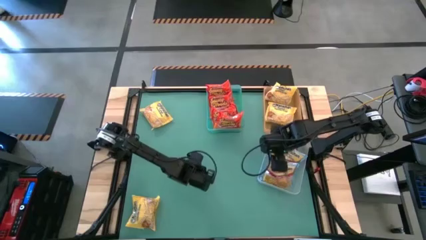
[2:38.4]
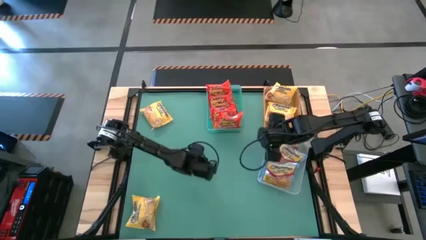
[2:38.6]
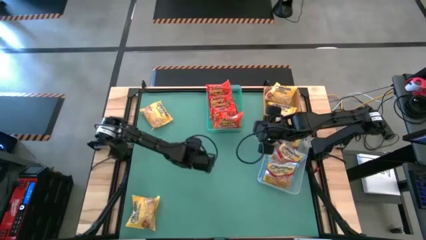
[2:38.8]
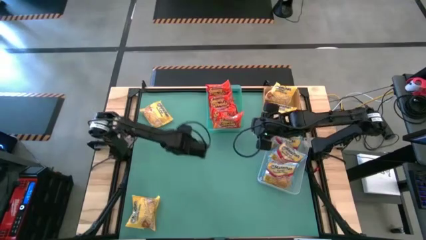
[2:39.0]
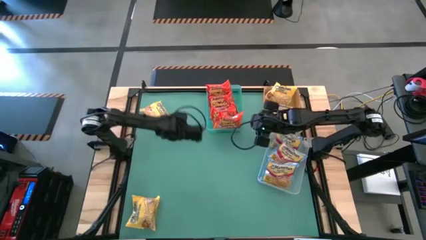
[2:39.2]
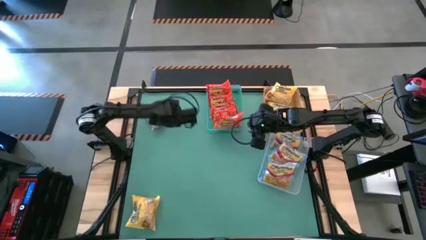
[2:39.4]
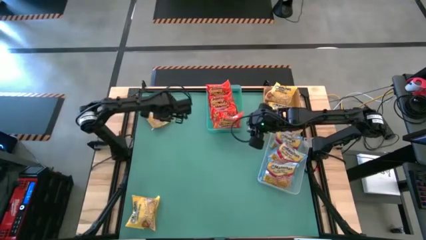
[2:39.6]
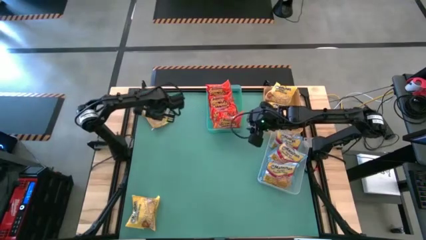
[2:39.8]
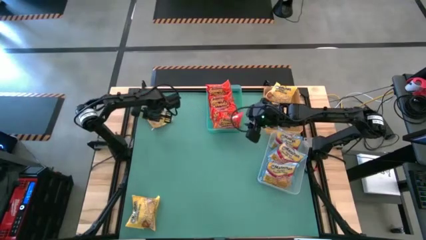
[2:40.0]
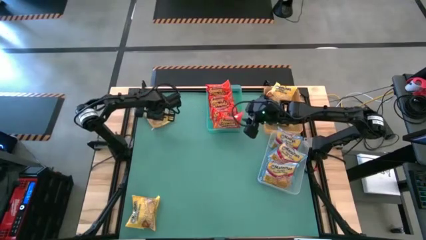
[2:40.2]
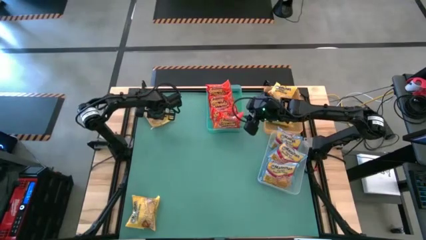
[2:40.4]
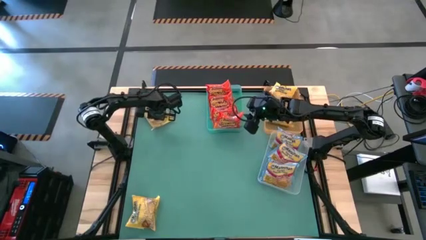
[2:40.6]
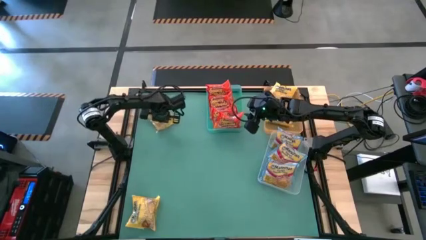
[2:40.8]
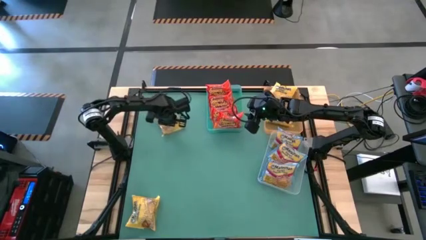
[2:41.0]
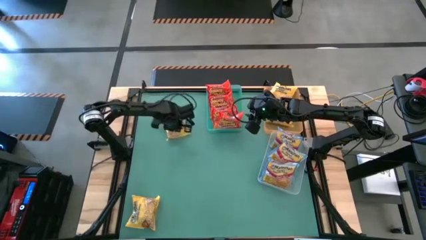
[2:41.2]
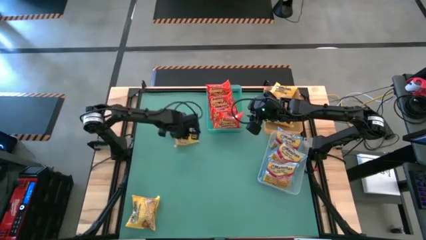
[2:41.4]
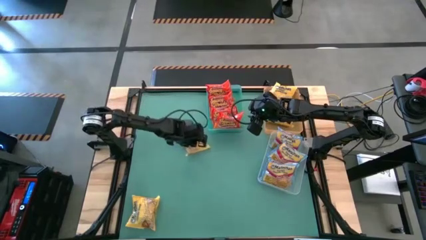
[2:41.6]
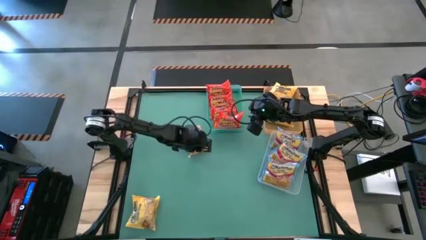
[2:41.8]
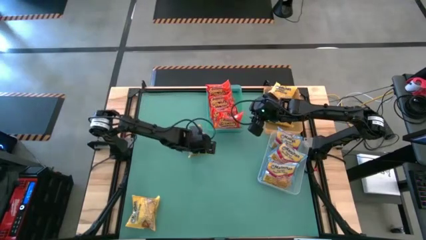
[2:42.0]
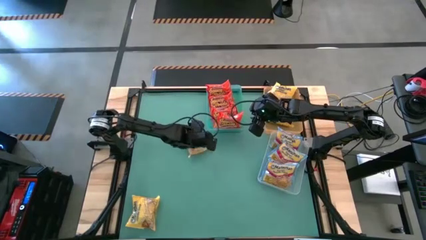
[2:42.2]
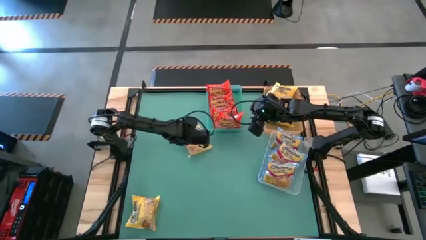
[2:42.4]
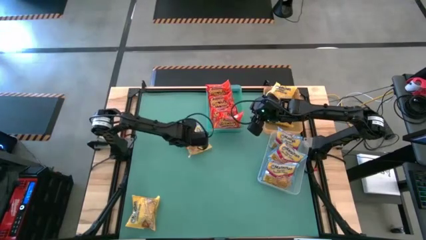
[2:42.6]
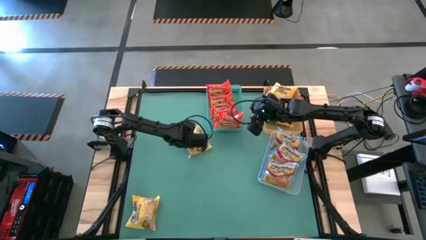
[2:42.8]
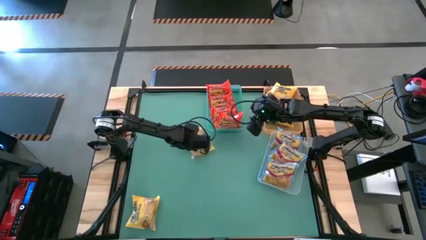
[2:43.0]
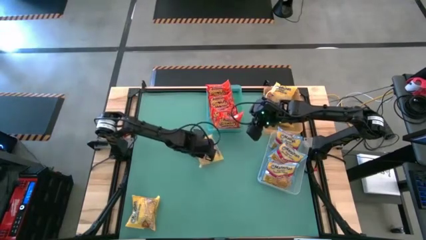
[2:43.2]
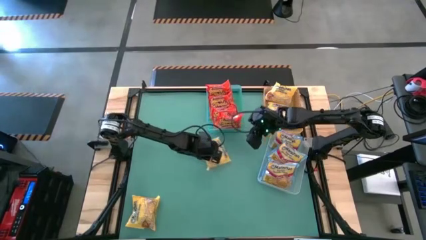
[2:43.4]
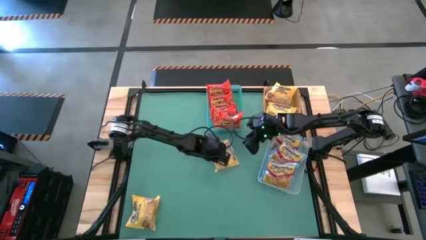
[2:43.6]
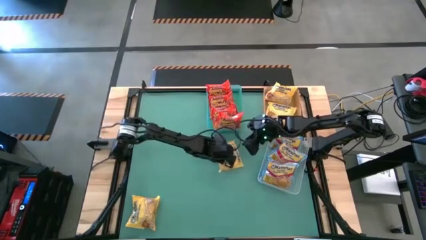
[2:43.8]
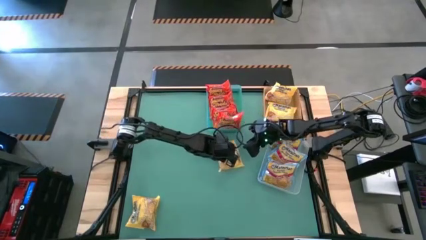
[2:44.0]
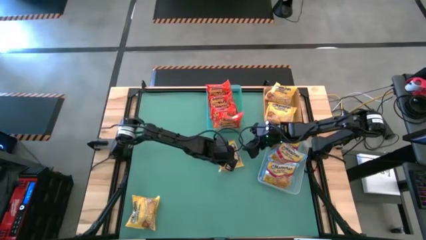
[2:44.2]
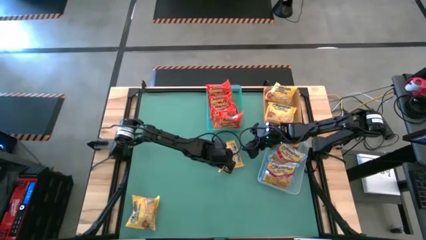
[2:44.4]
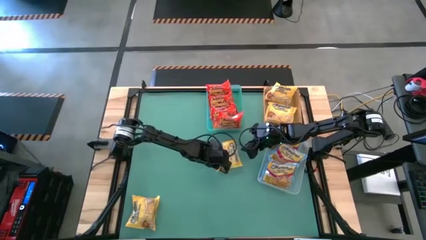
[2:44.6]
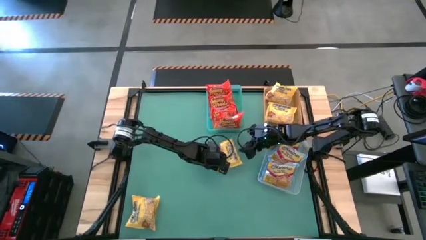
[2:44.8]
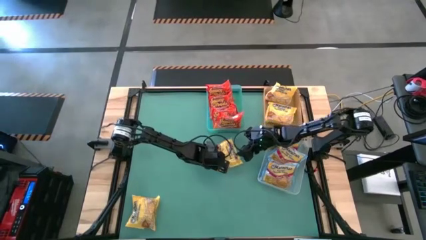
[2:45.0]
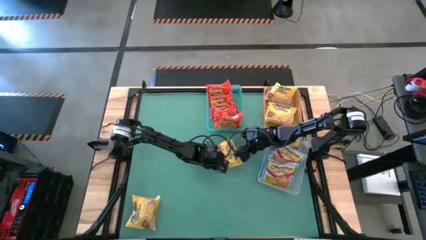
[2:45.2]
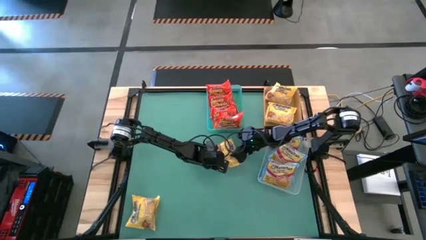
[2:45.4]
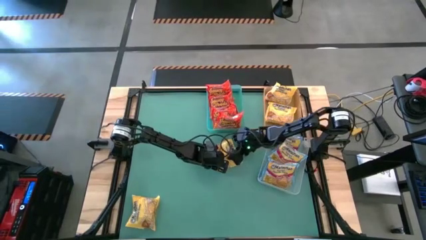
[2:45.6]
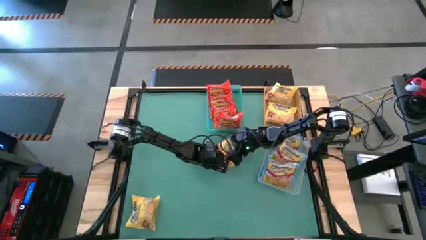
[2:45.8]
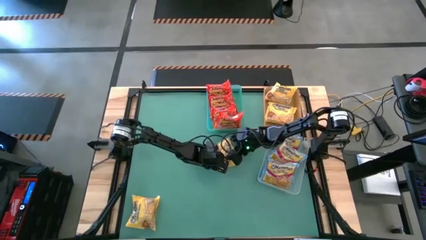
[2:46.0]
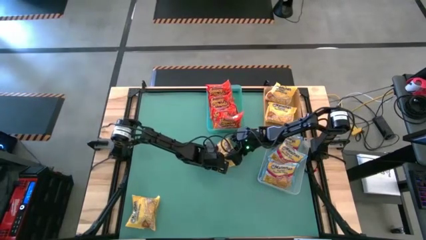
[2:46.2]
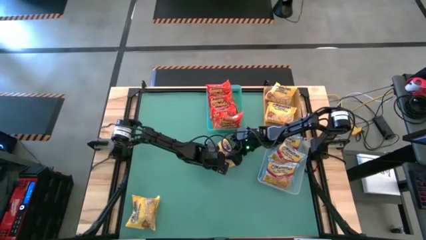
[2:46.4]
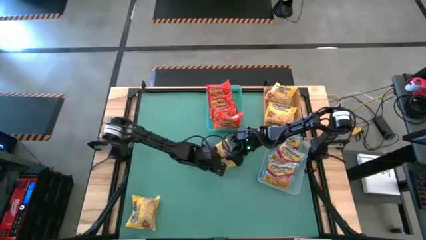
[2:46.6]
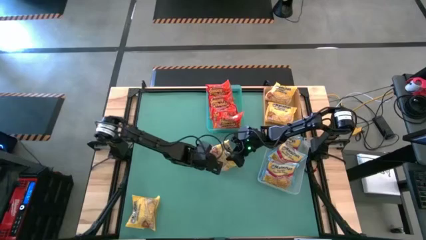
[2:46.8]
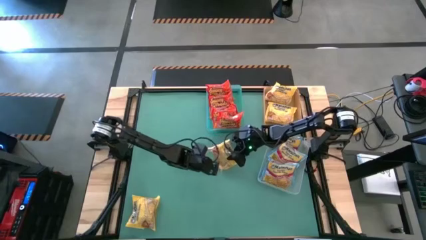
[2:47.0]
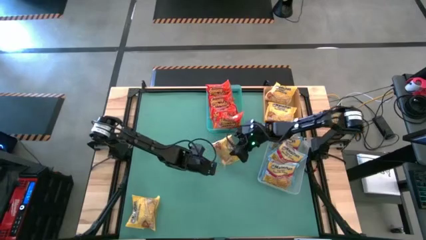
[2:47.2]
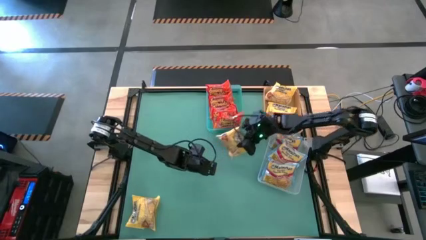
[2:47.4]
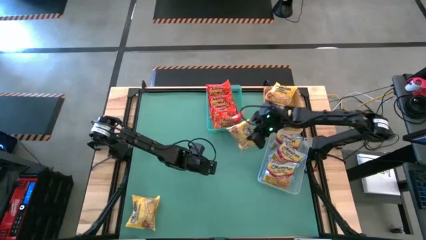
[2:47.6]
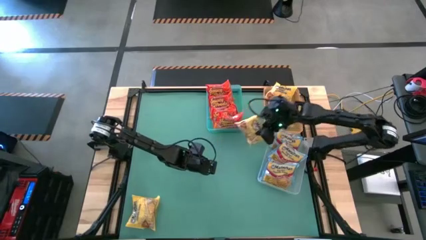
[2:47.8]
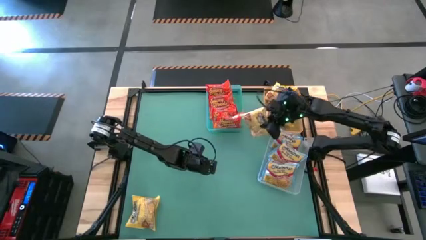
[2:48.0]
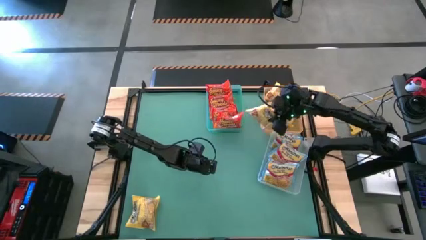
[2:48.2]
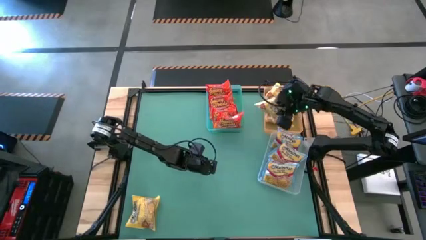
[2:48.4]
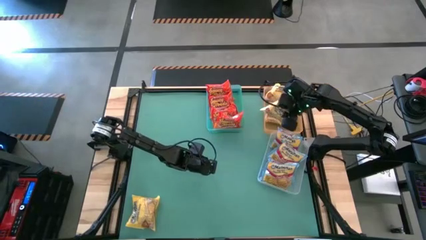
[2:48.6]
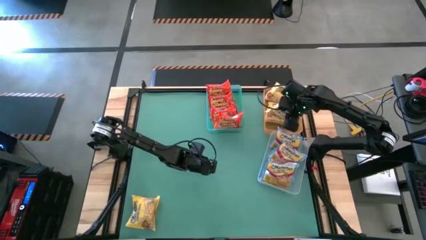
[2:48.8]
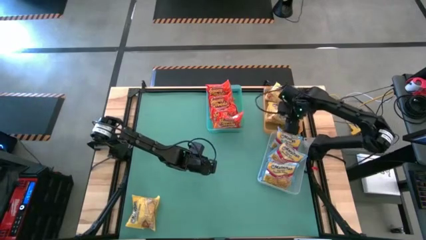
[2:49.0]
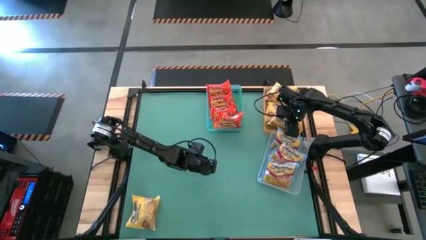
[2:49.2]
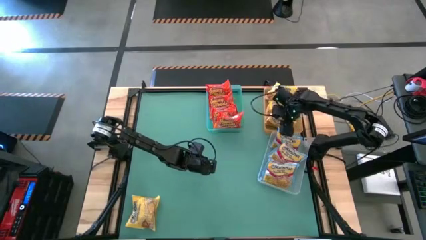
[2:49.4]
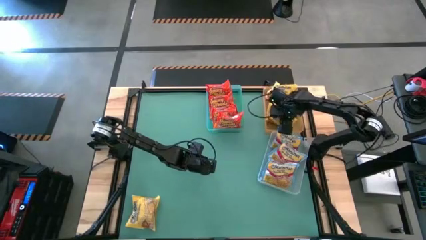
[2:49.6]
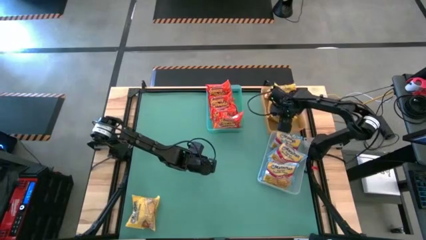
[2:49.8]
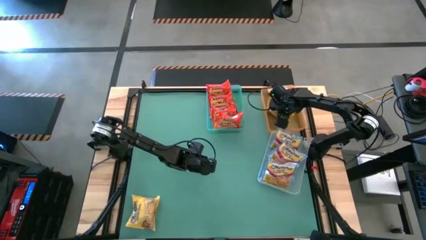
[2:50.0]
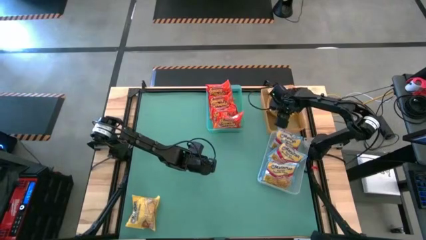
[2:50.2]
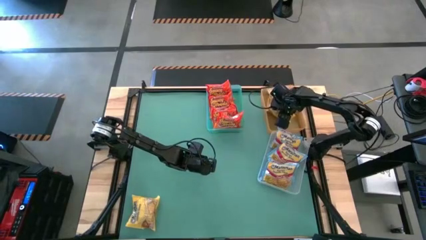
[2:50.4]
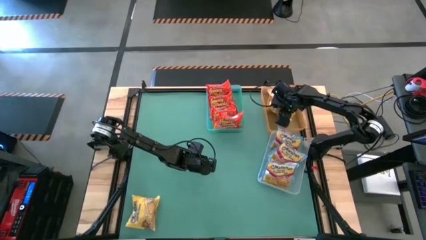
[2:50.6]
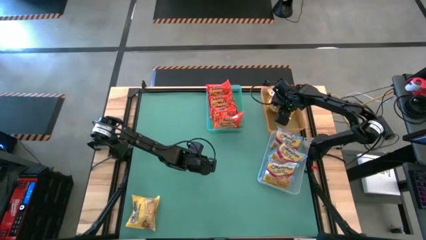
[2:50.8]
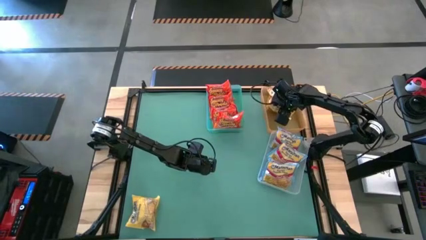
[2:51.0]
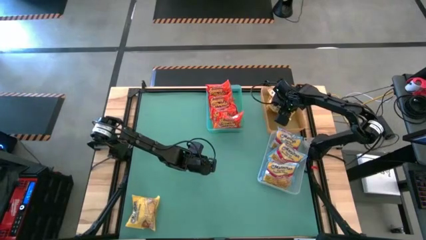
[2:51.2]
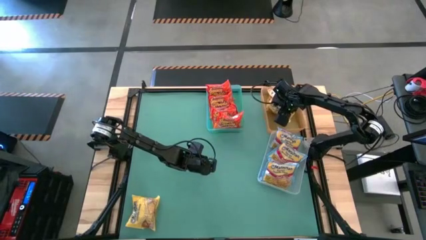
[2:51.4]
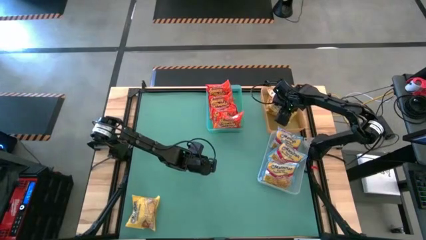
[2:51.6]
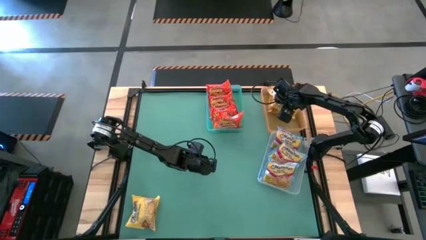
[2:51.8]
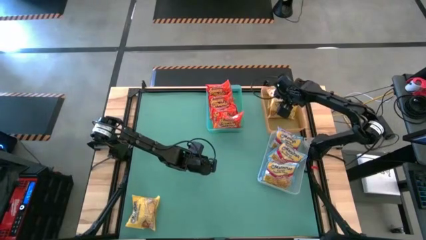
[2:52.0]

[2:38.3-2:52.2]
Task: Sort Maruchan noodles
Put the yellow noodle pack into the orange bin
